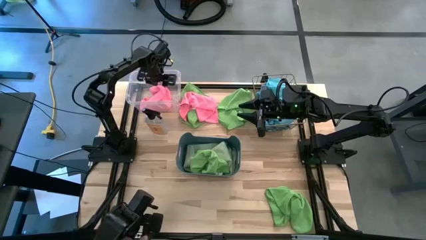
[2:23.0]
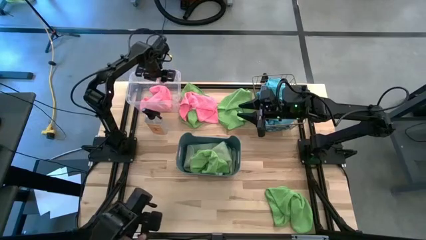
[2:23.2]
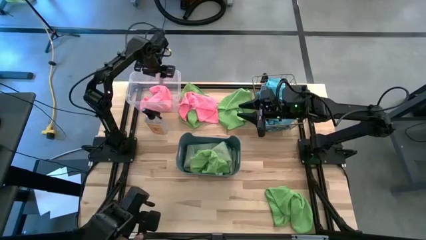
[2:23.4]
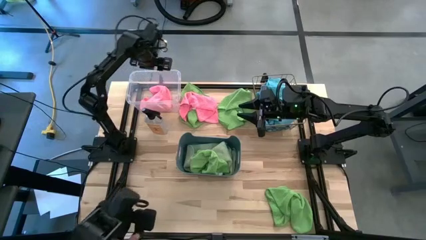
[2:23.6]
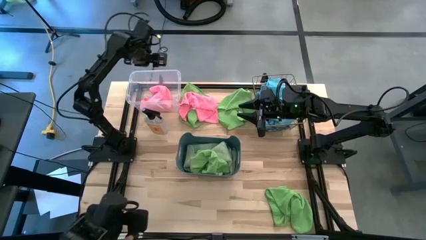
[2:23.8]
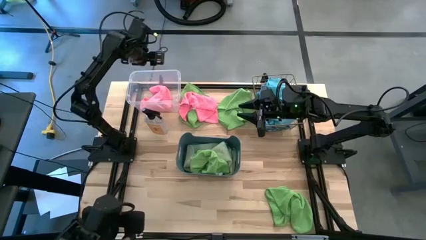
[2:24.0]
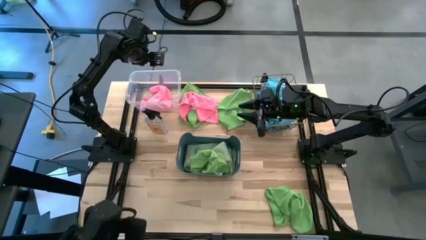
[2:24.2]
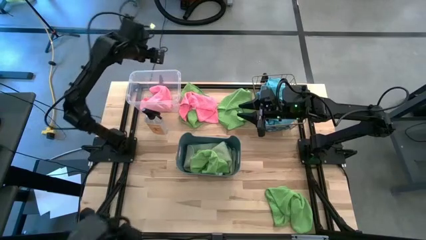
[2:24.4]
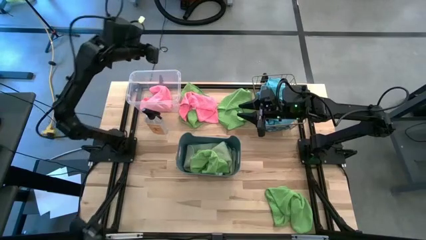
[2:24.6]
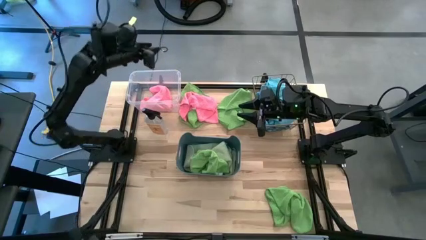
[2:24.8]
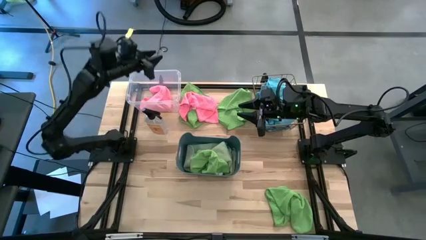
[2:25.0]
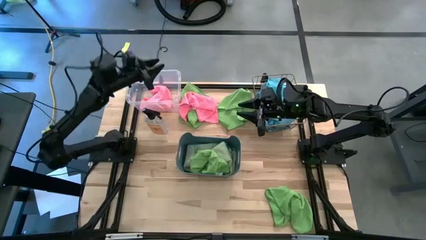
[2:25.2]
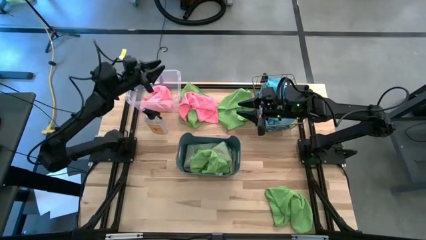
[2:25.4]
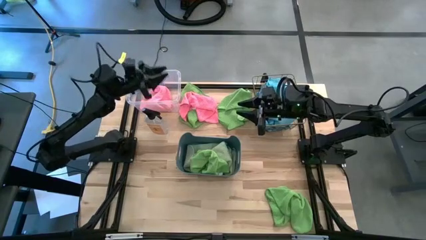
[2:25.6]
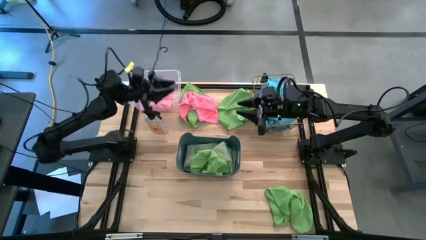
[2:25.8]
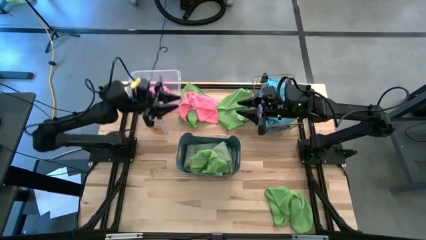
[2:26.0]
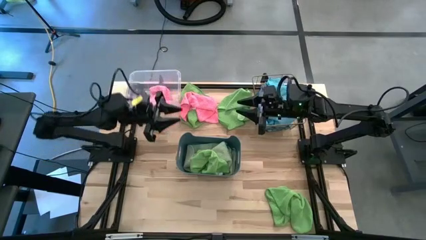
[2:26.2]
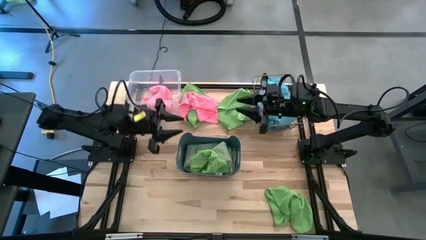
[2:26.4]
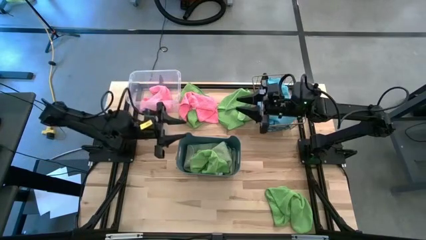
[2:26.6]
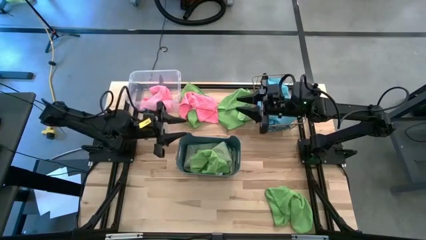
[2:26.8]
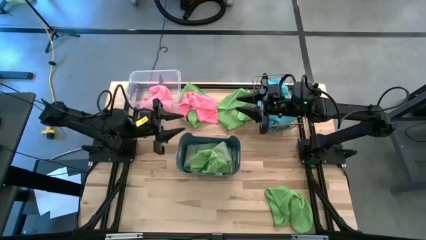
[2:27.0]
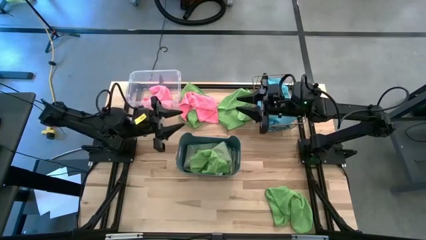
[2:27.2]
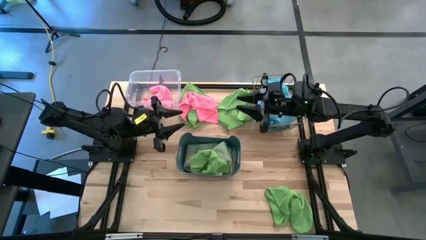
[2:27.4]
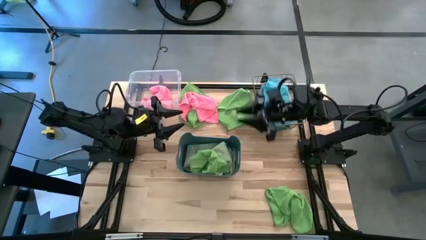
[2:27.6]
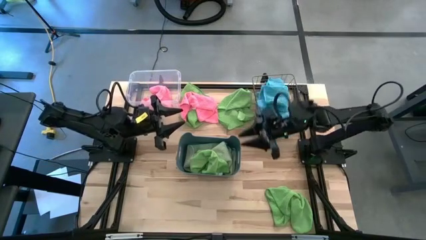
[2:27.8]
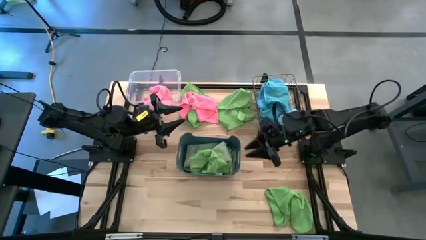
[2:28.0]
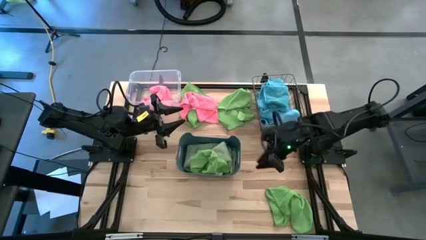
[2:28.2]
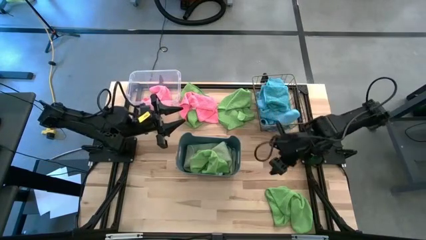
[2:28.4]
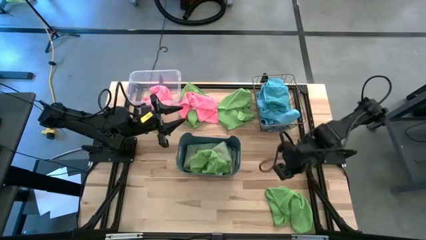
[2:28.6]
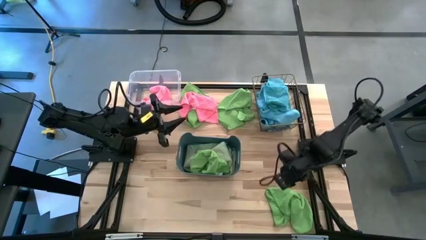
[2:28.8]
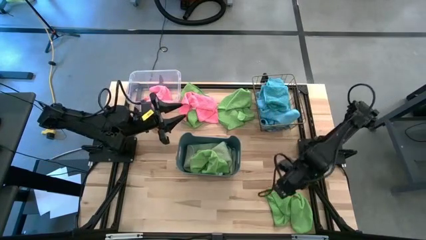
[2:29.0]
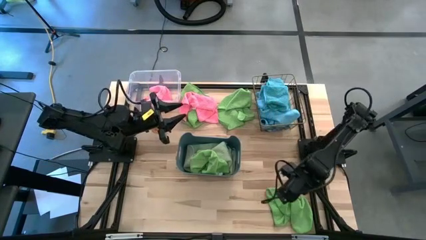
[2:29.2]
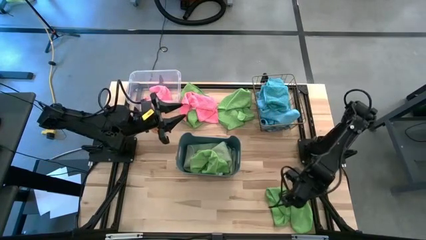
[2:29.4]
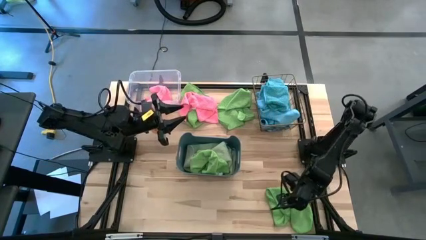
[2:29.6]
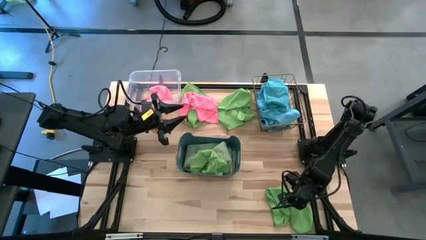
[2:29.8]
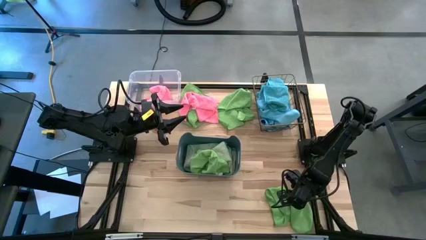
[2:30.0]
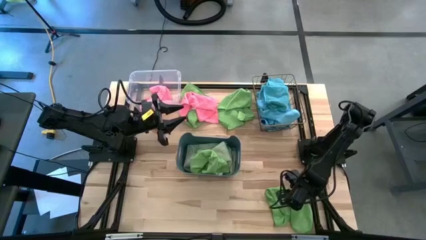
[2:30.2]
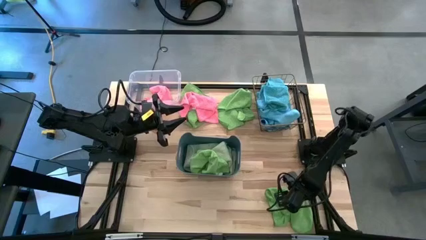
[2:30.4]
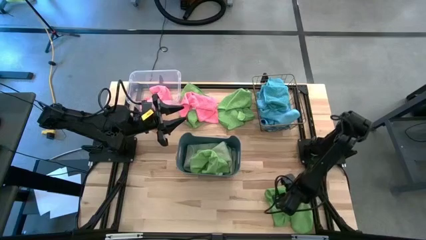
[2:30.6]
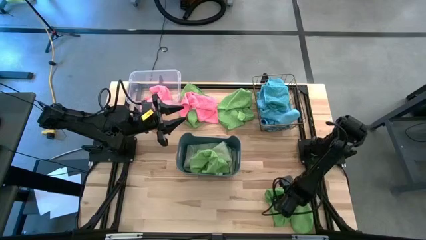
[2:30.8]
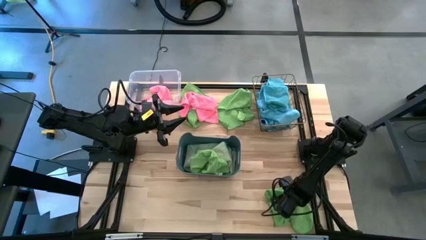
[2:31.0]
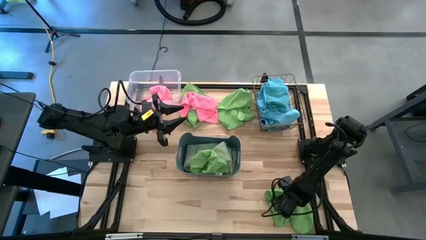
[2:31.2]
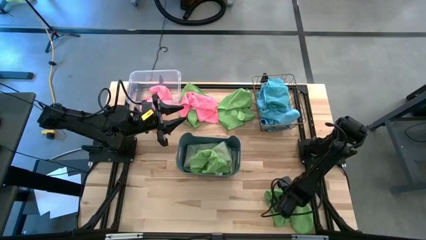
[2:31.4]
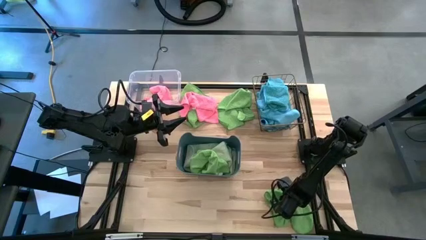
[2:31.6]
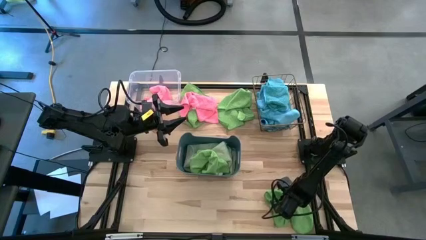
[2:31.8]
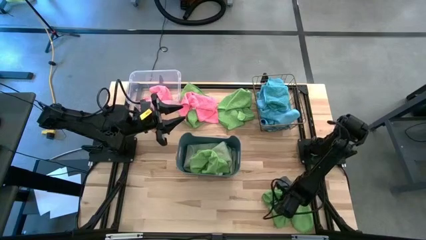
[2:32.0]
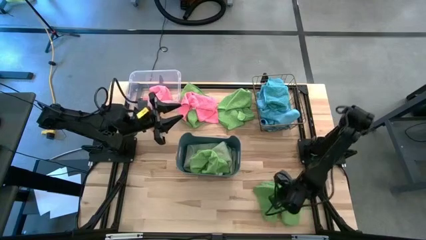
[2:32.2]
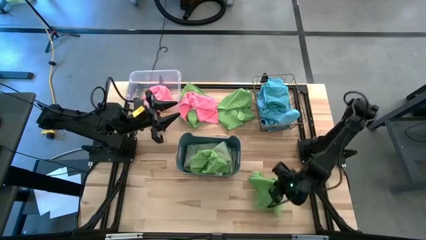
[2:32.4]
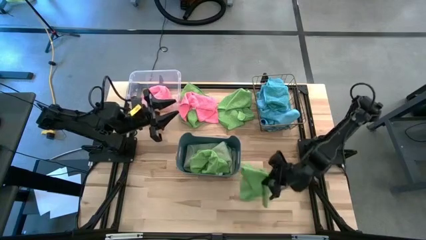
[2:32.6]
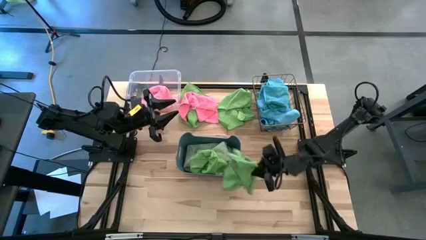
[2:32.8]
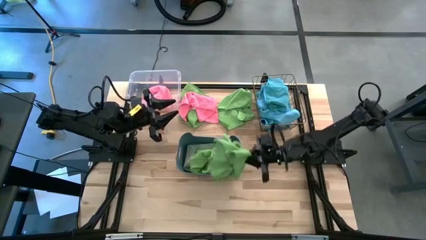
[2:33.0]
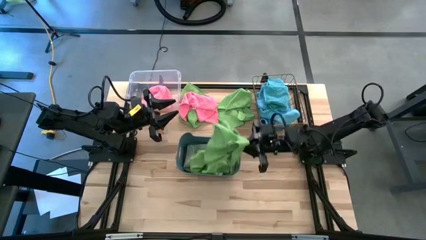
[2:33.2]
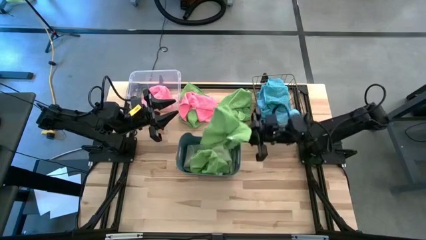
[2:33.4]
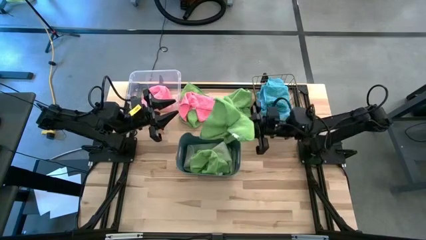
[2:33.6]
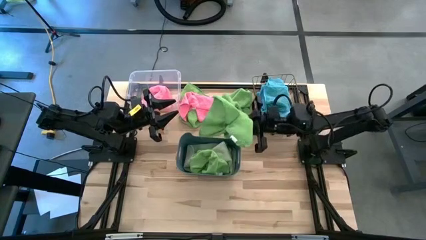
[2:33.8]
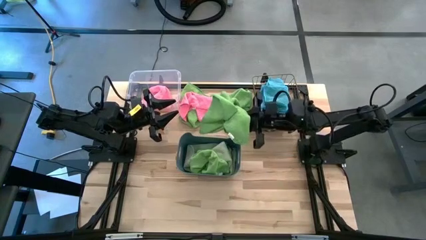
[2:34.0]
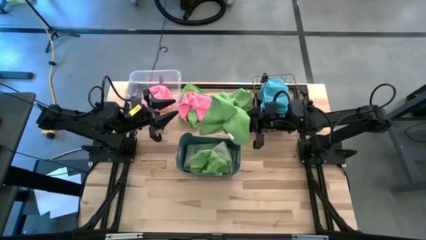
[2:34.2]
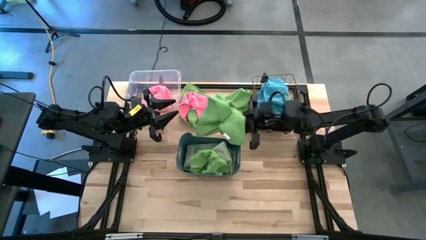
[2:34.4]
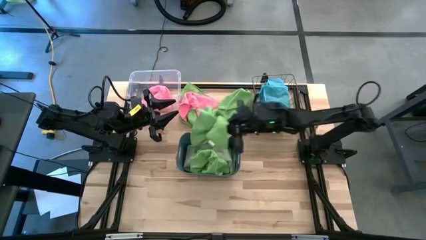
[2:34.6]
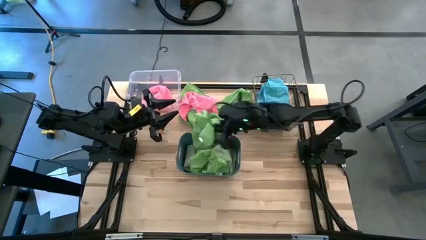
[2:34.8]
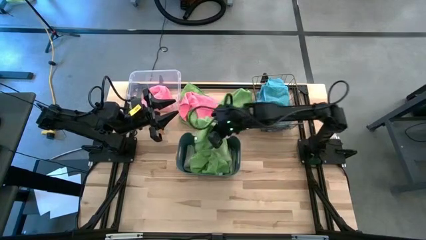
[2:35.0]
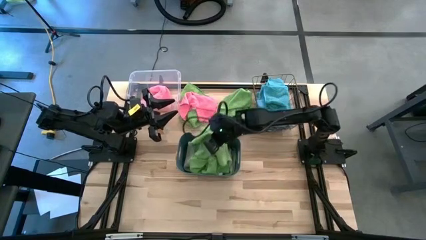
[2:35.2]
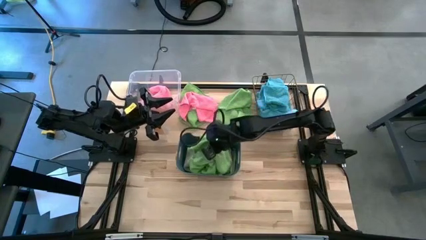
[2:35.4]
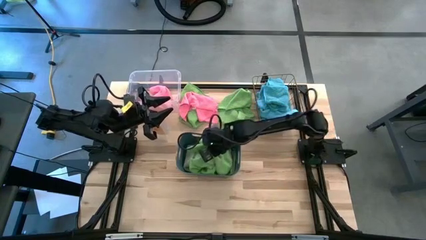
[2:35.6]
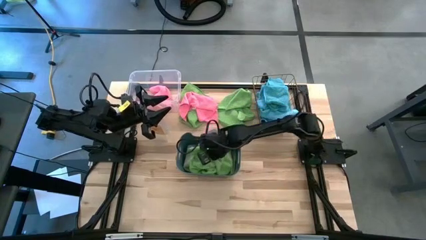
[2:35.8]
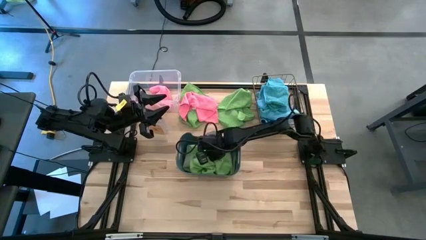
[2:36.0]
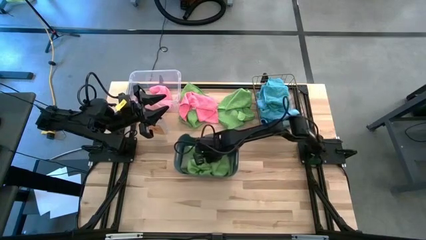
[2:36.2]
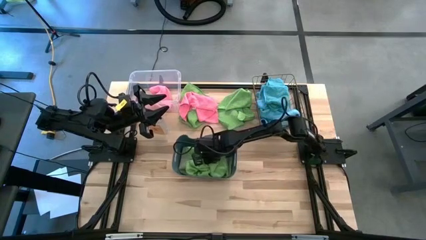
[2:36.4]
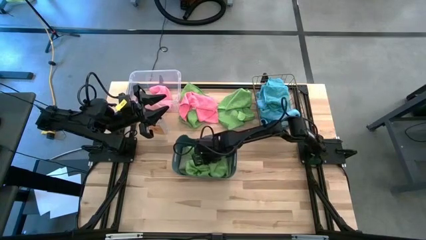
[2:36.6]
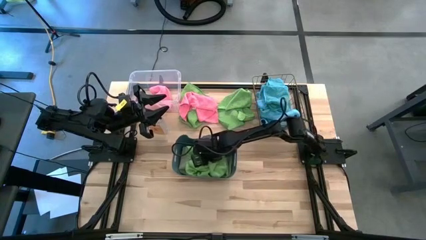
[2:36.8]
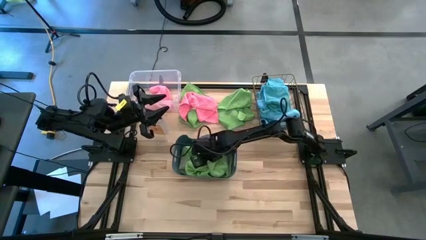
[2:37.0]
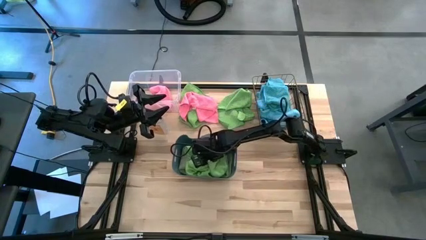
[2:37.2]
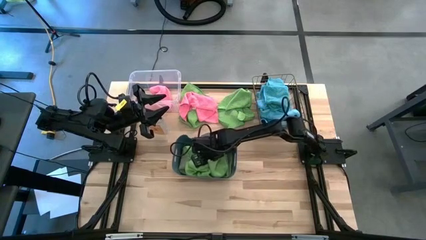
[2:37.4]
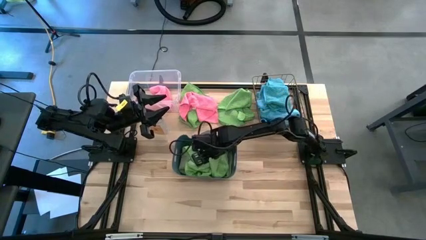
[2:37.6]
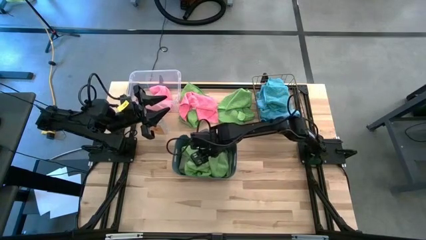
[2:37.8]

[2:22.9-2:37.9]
Task: Sort microfiber towel by color & place in baskets
Put the green microfiber cloth into the blue bin

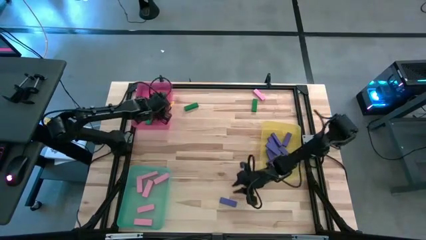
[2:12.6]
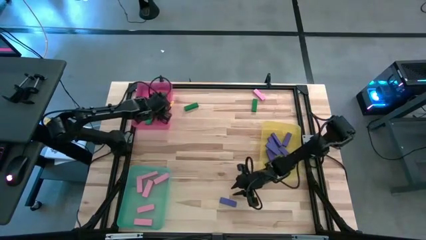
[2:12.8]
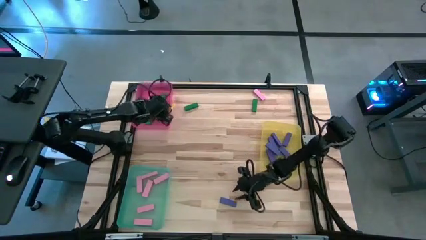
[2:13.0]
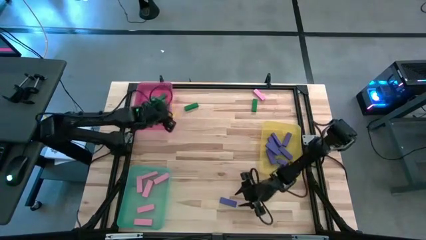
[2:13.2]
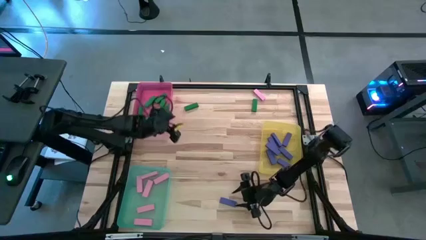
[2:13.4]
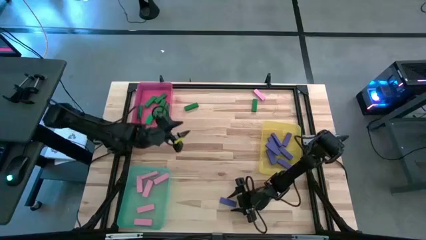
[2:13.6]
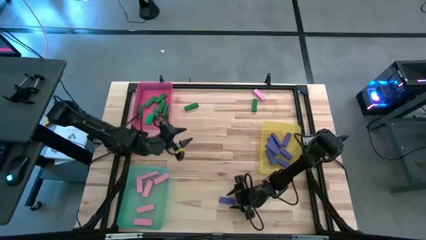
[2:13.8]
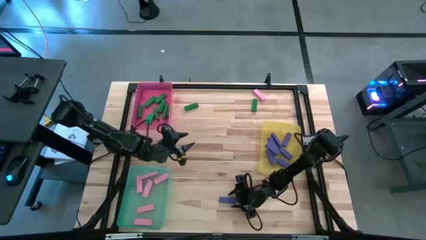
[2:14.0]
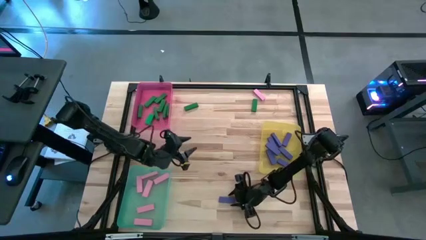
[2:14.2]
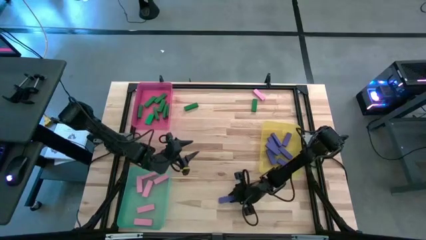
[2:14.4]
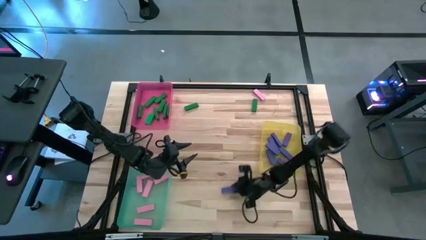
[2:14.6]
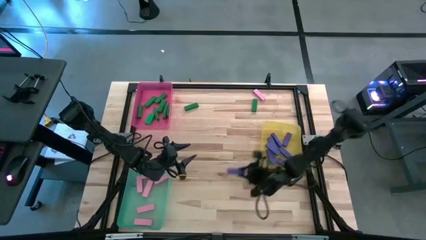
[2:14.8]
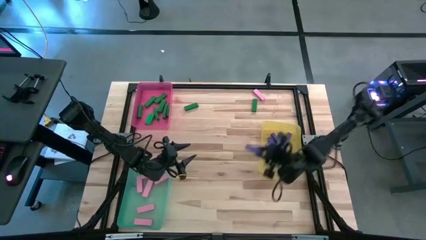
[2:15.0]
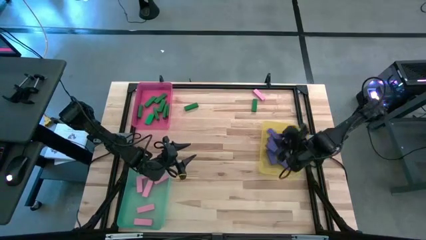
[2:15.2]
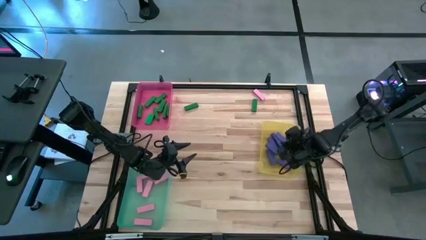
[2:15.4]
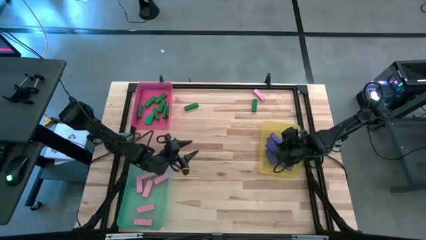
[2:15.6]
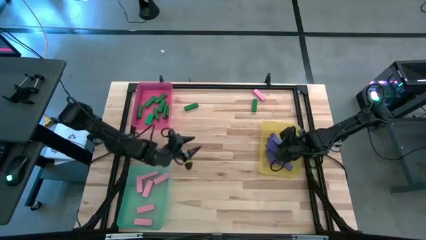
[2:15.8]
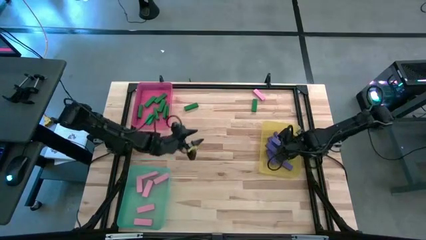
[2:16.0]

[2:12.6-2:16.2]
Task: Sort blocks
Put the blue block into the yellow bin
